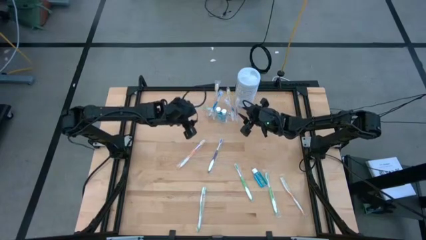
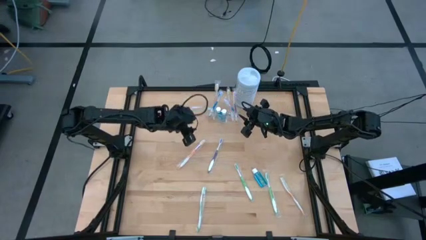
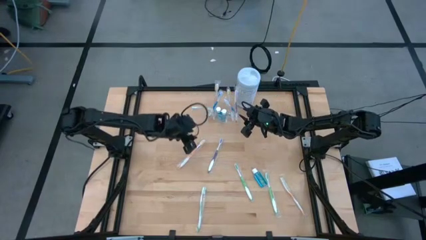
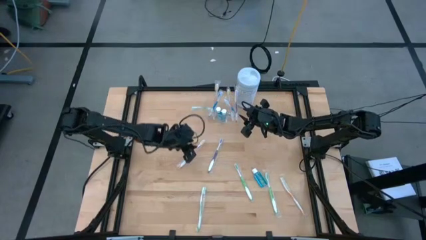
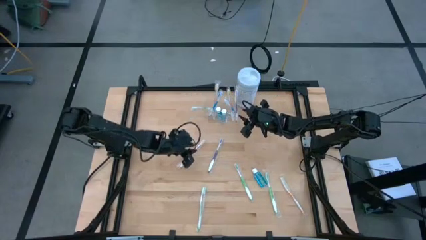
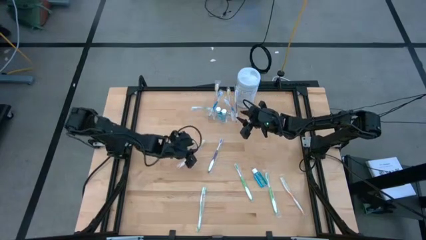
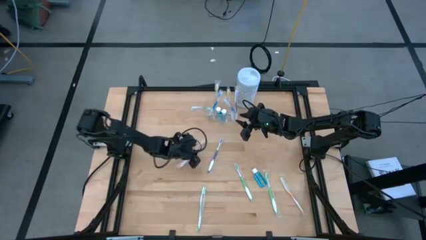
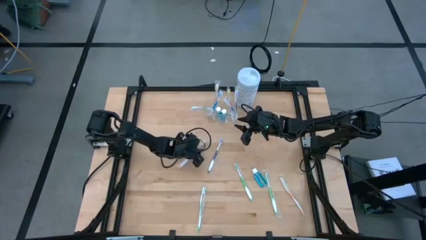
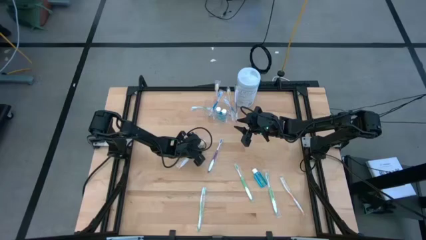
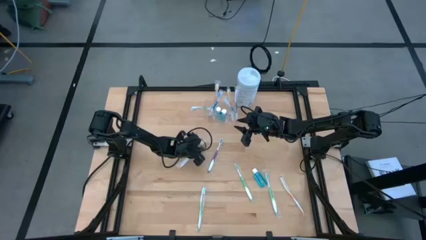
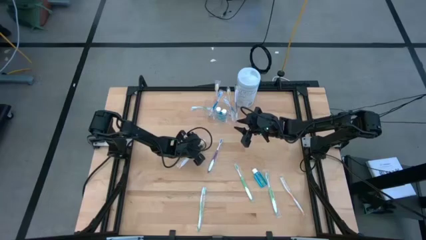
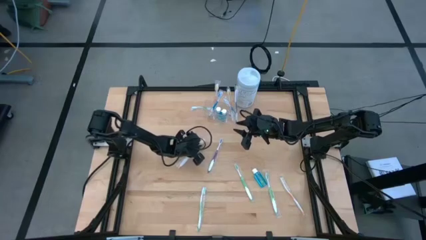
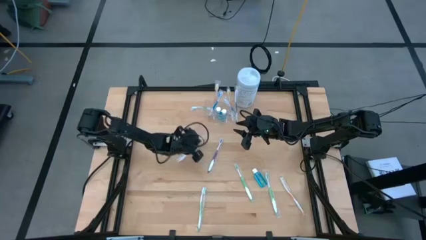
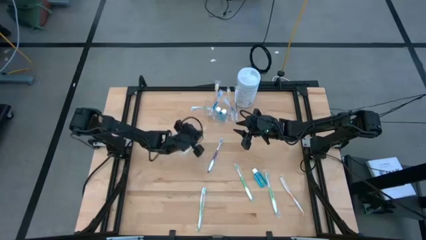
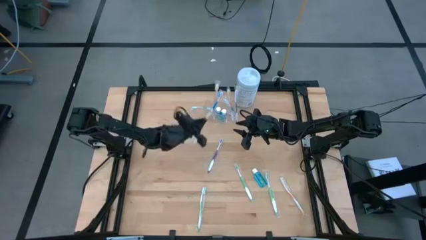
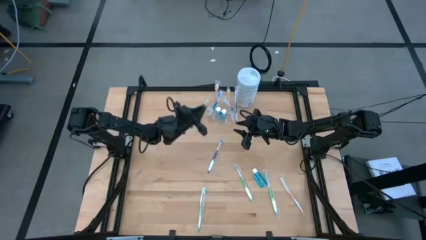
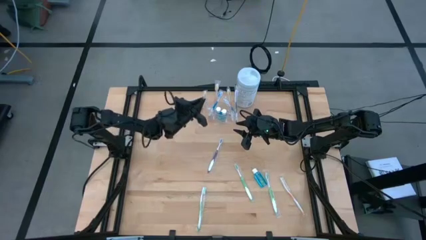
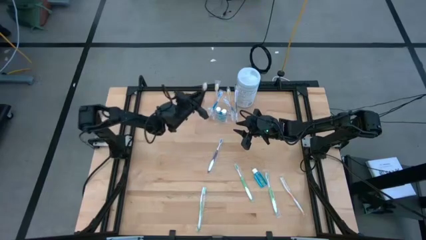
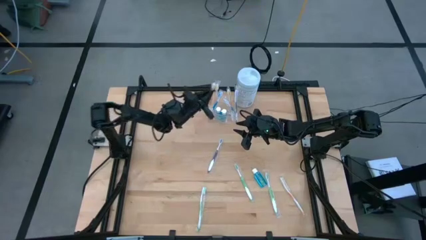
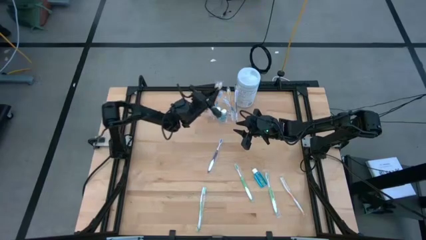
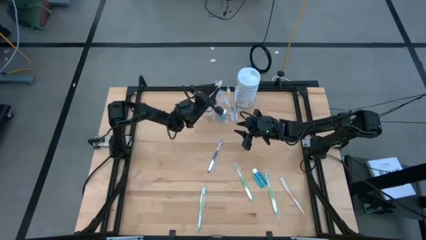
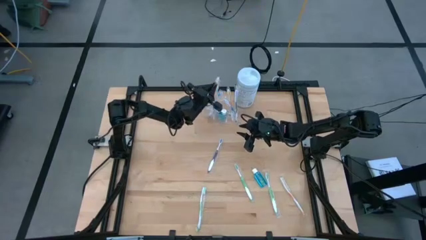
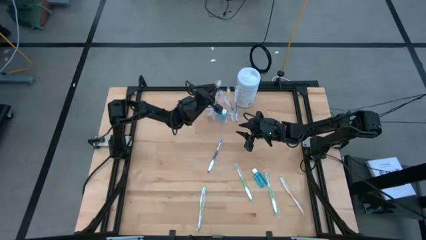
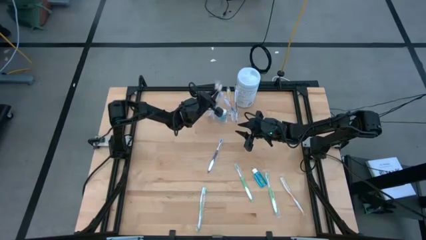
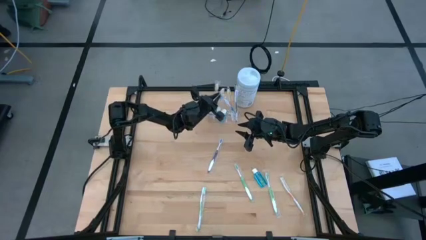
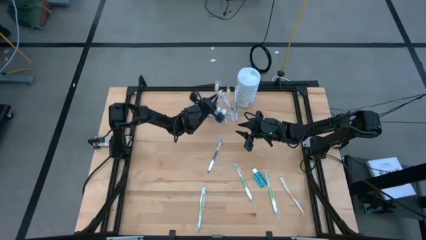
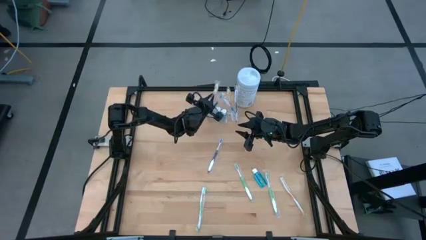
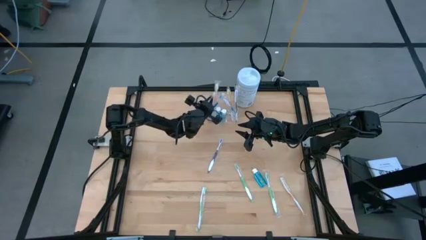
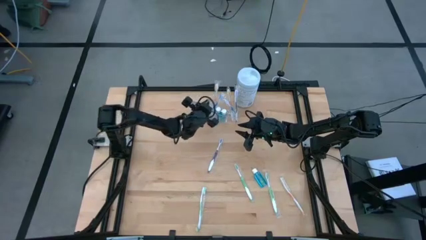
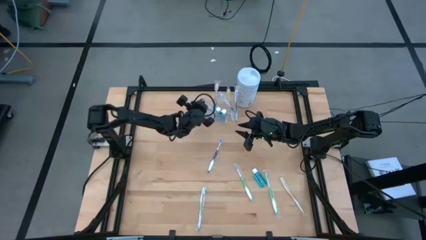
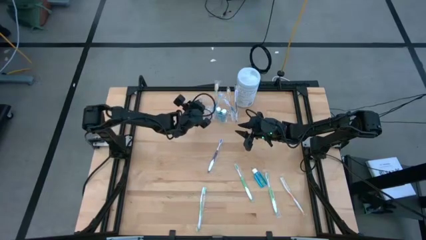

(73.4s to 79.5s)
Task: Pick & Place toothbrushing station
Put the orange toothbrush into the transparent organizer

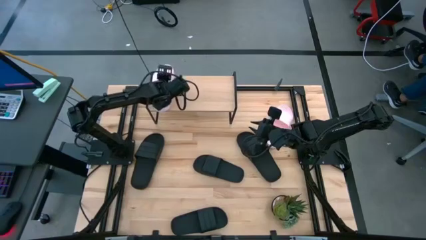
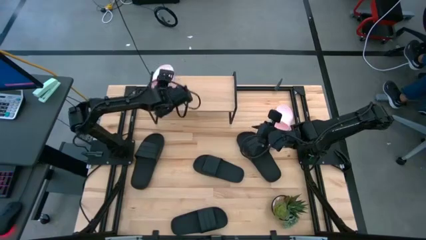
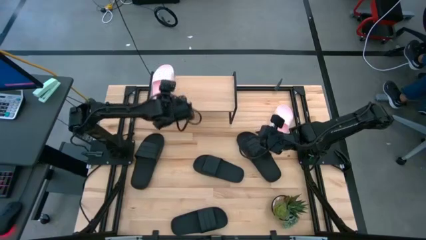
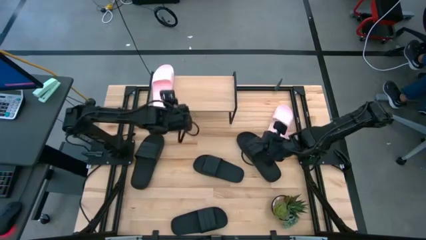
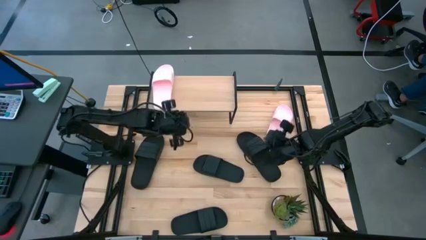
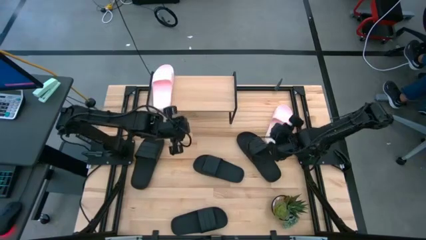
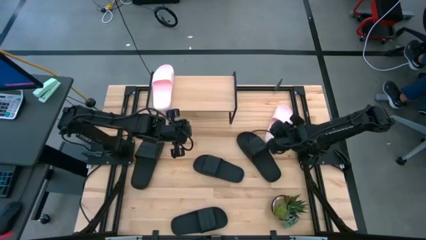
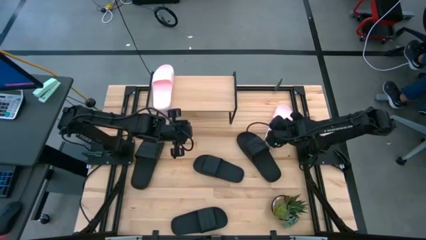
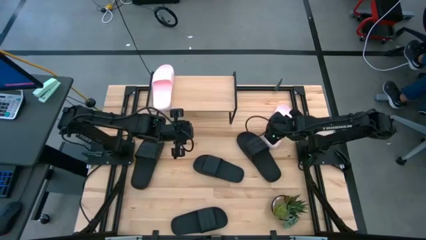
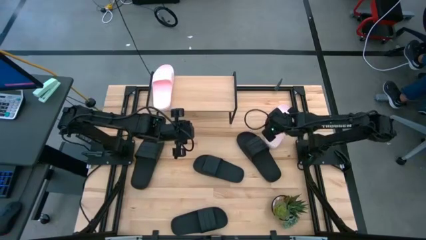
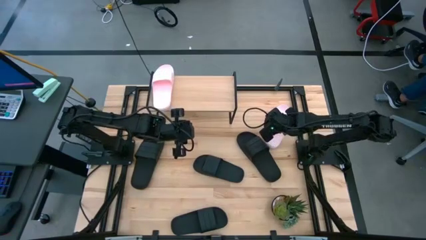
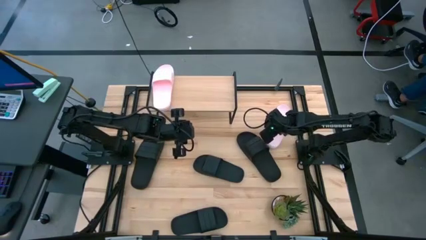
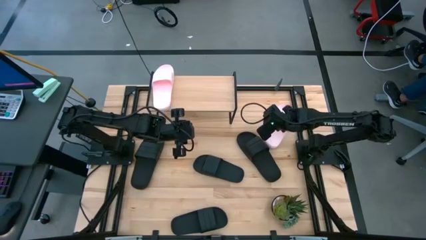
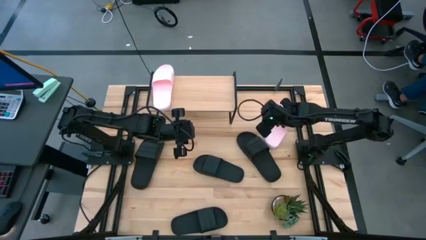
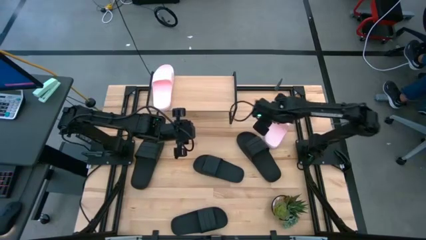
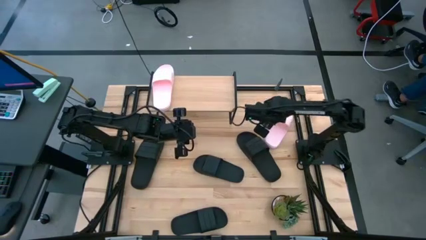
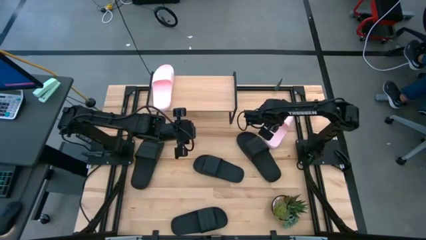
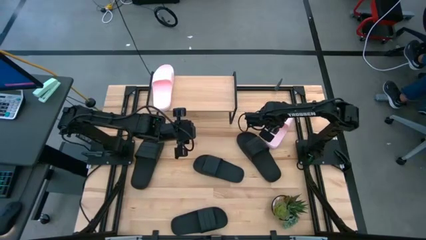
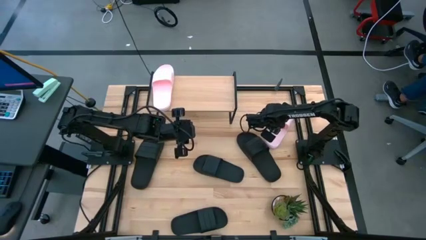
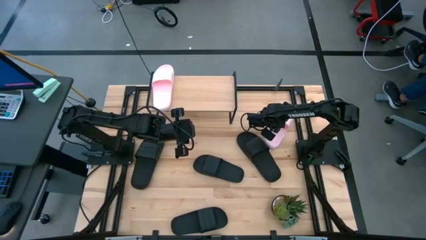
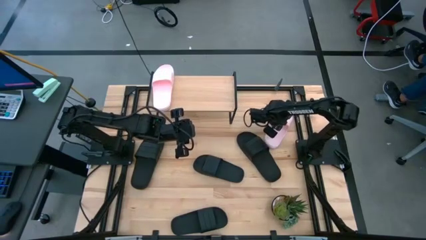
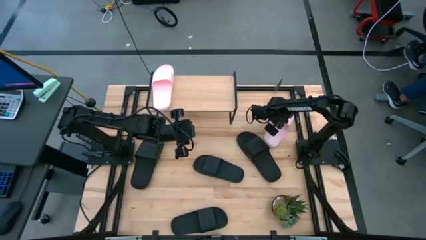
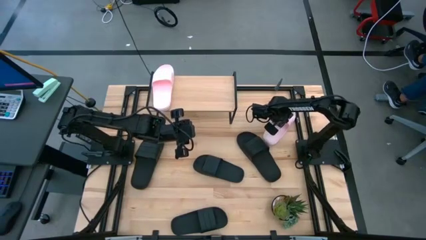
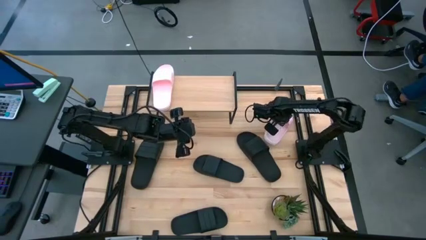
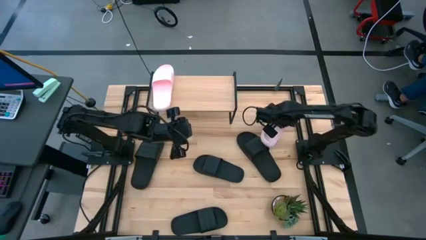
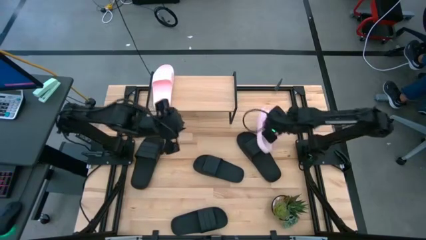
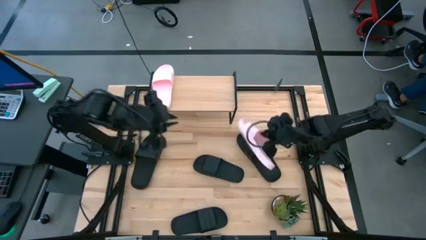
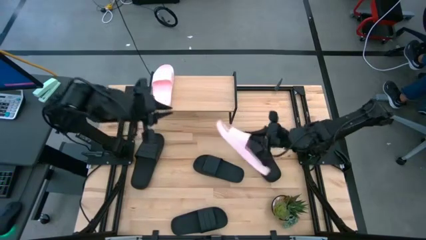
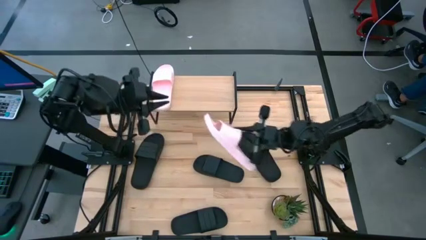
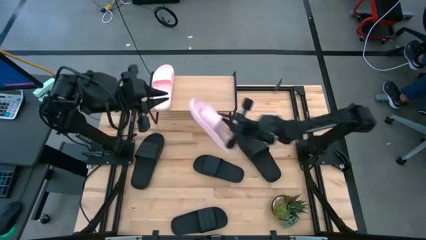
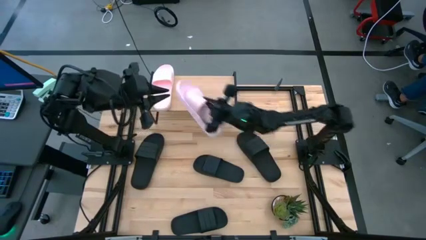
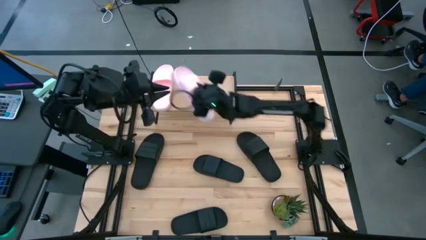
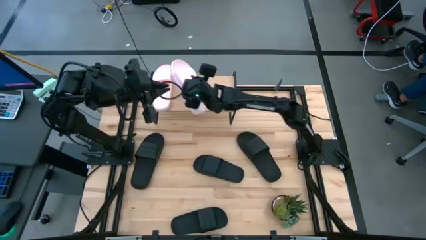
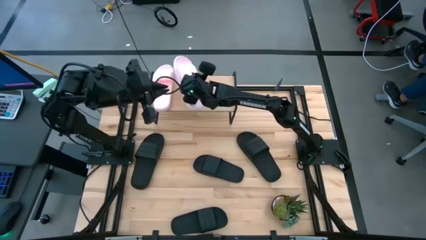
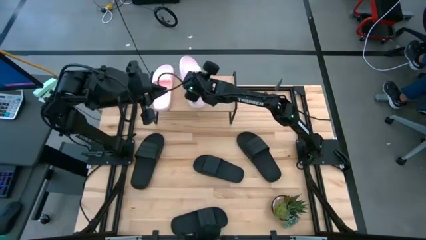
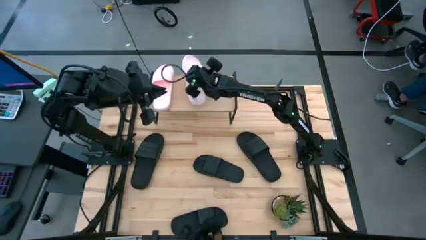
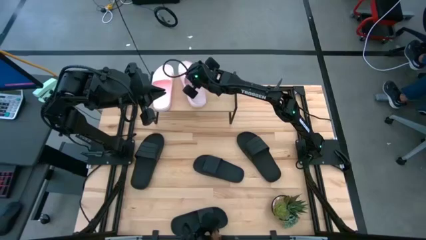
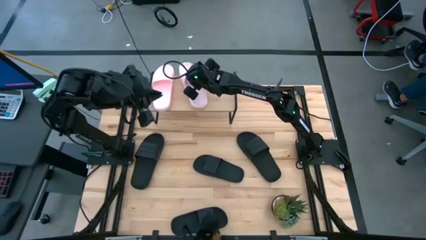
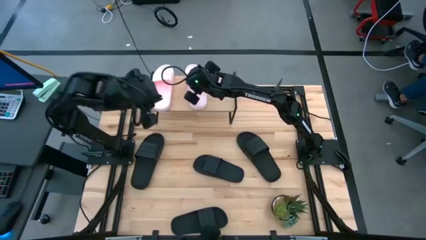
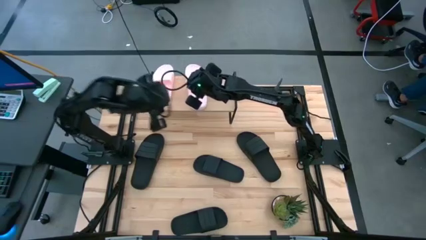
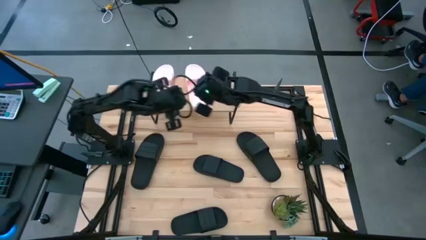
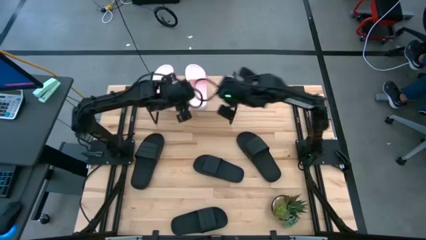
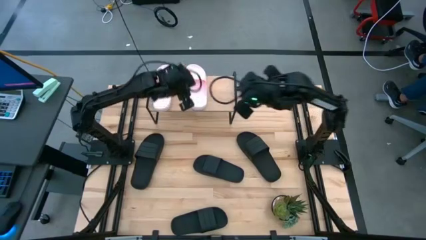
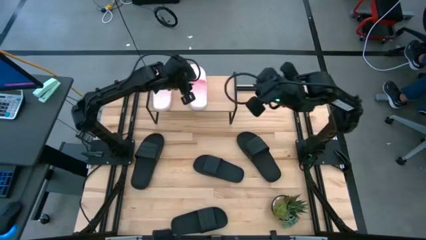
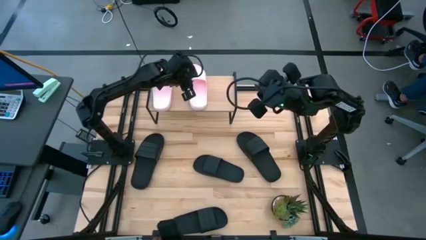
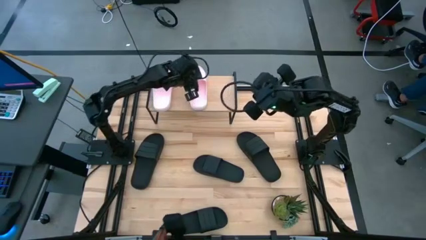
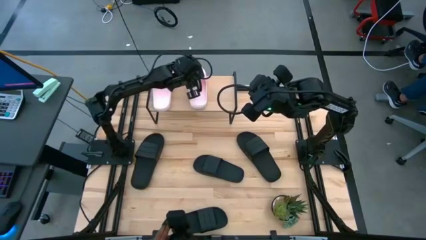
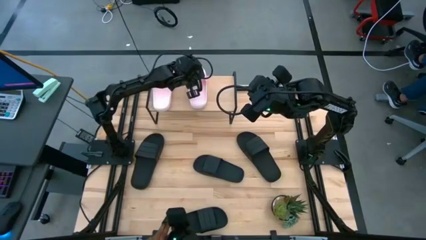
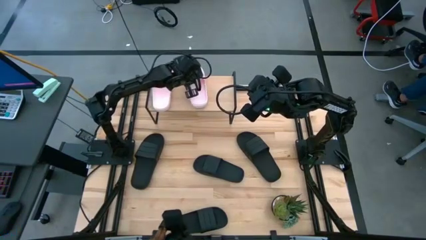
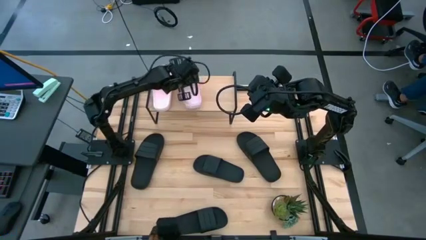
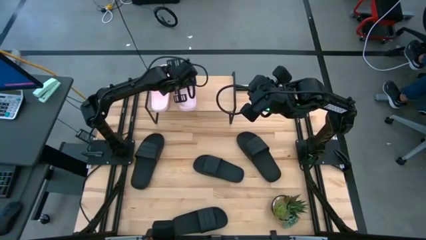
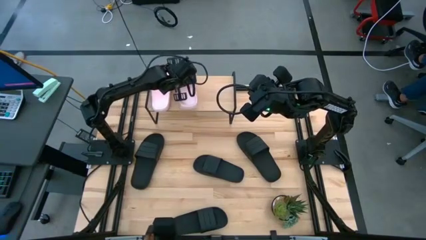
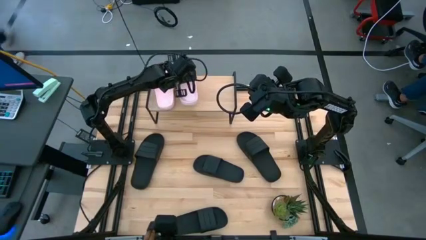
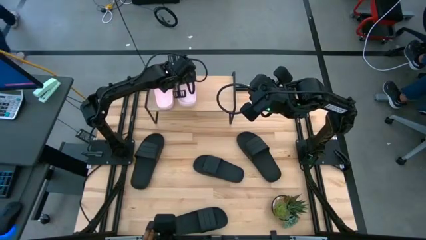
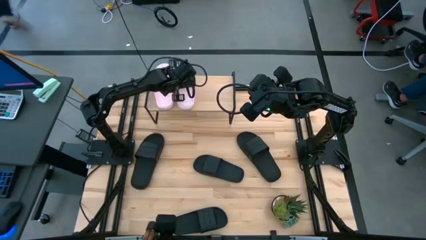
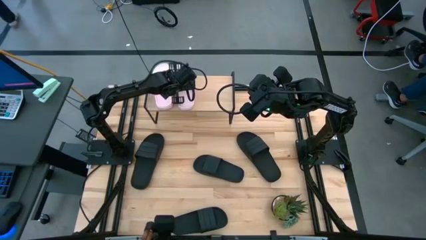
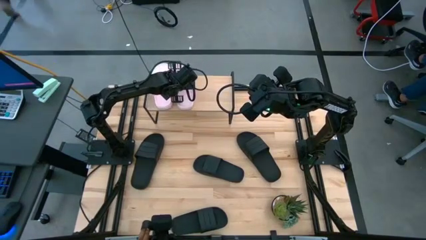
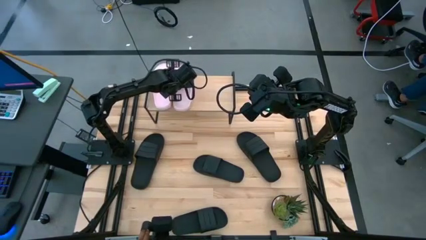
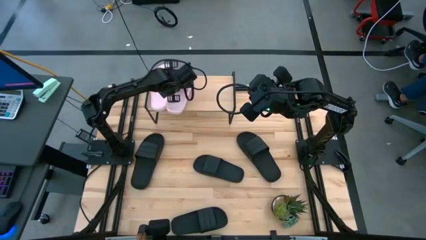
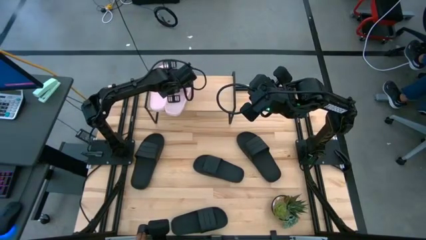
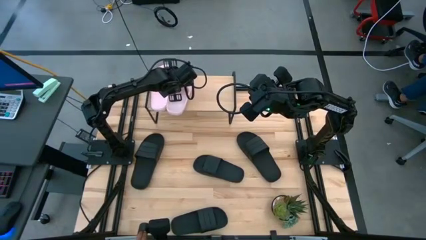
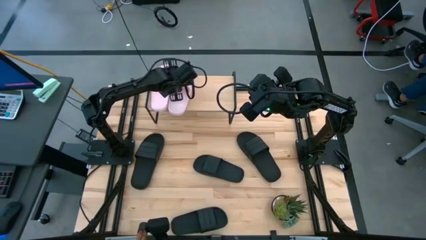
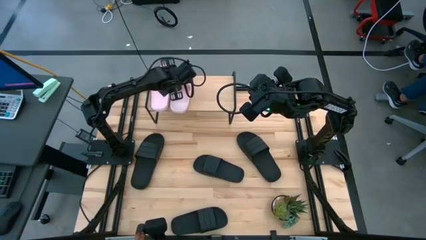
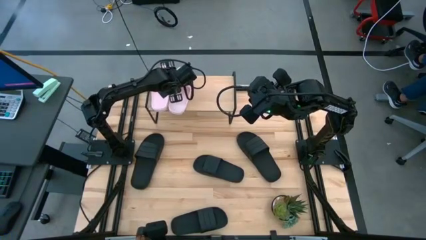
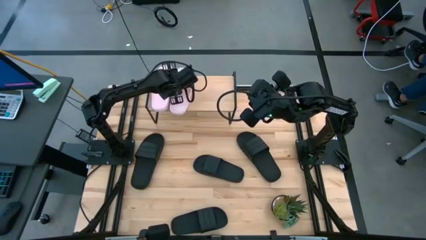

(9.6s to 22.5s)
Task: Pick and place slides into the shelf
Put the pink slide on the shelf
